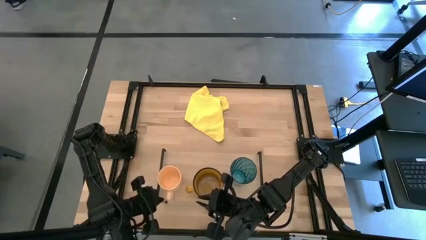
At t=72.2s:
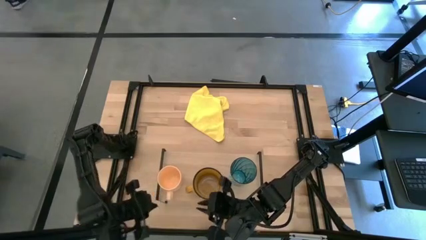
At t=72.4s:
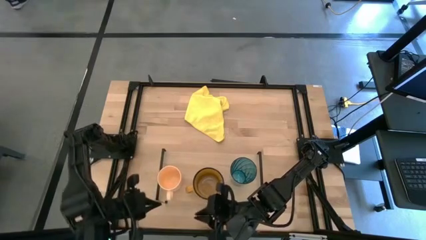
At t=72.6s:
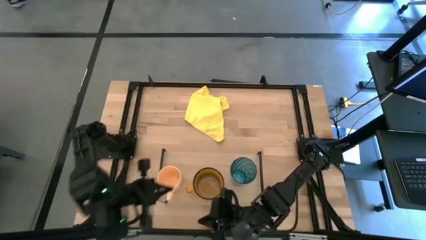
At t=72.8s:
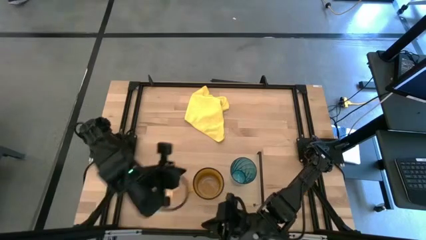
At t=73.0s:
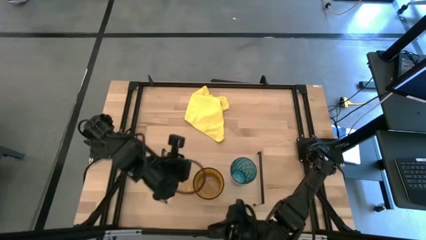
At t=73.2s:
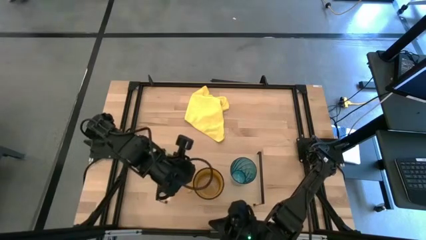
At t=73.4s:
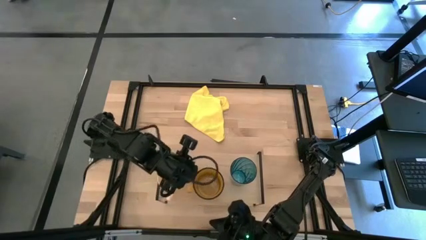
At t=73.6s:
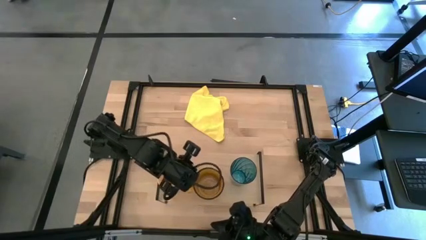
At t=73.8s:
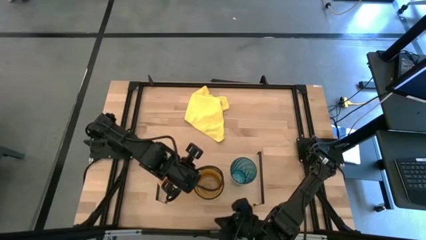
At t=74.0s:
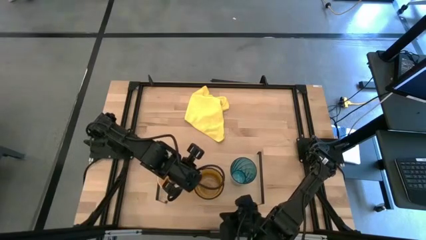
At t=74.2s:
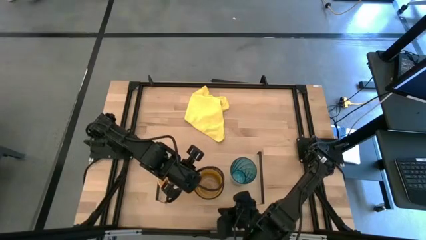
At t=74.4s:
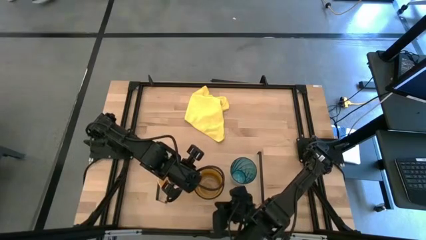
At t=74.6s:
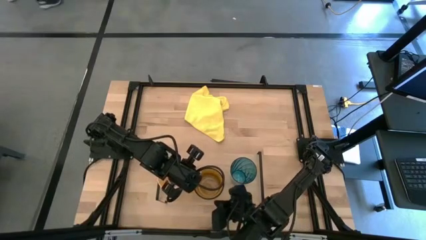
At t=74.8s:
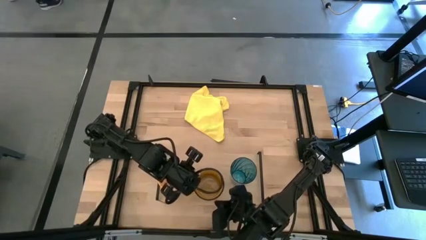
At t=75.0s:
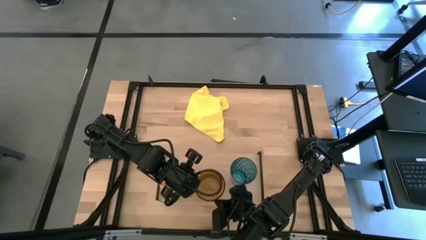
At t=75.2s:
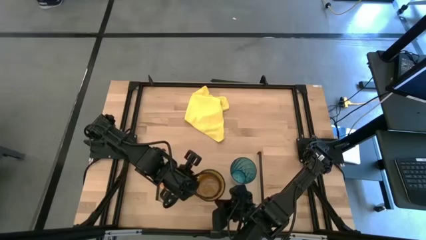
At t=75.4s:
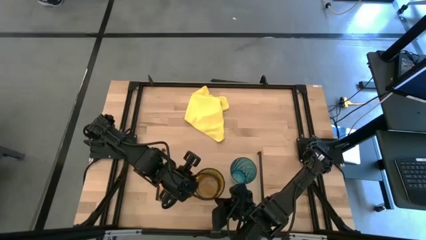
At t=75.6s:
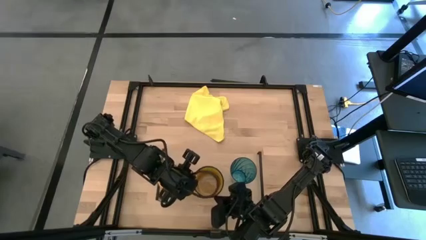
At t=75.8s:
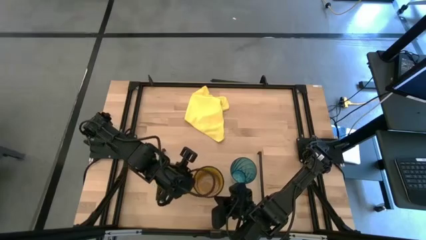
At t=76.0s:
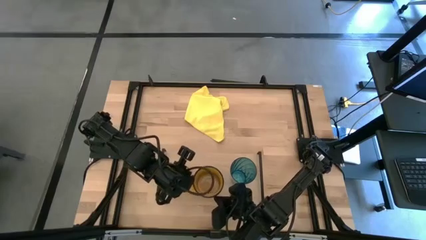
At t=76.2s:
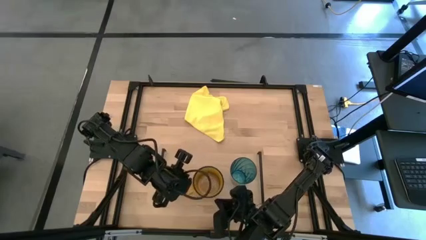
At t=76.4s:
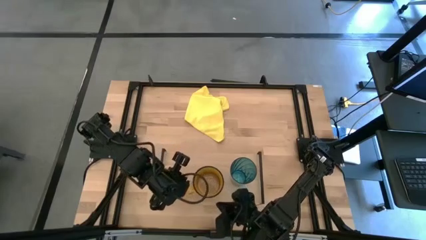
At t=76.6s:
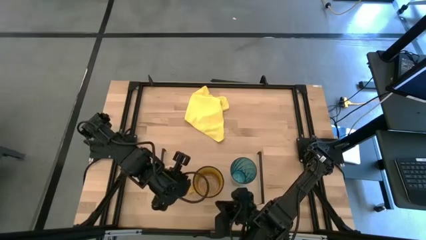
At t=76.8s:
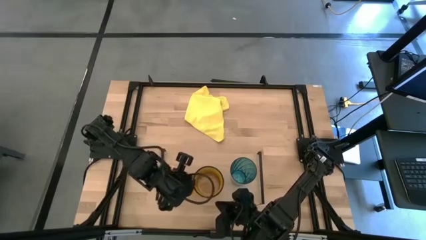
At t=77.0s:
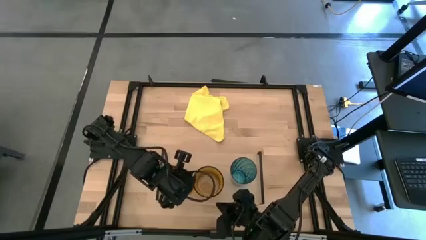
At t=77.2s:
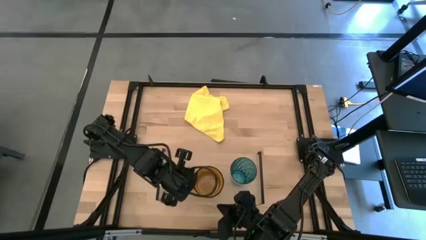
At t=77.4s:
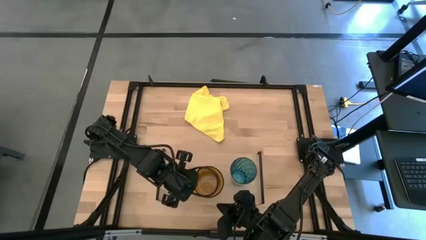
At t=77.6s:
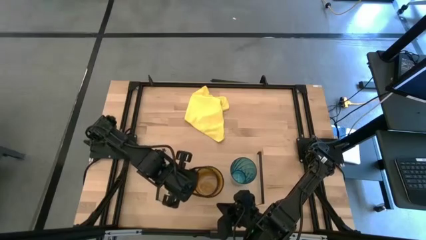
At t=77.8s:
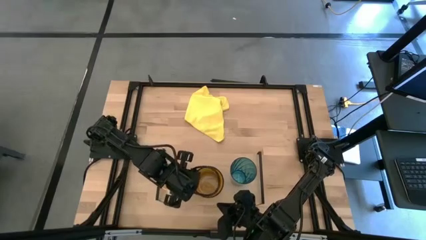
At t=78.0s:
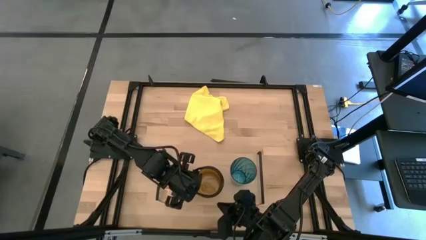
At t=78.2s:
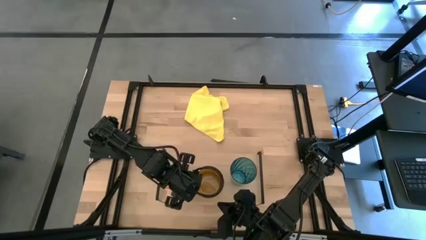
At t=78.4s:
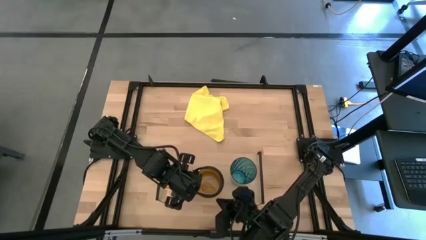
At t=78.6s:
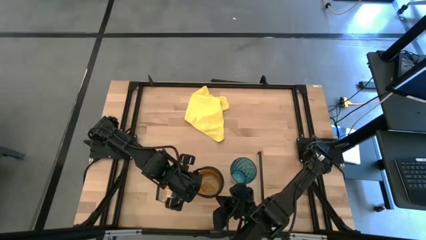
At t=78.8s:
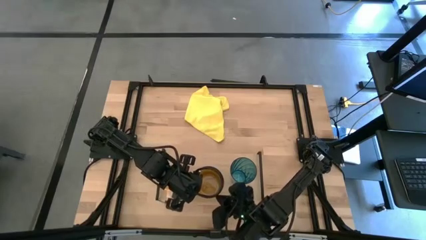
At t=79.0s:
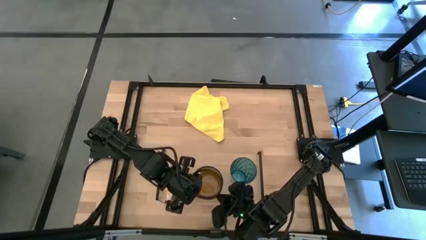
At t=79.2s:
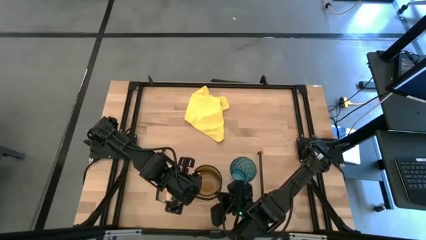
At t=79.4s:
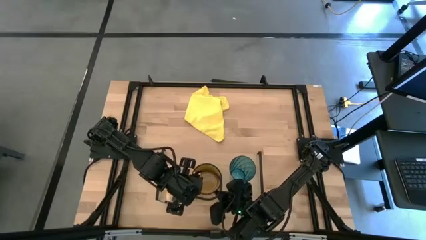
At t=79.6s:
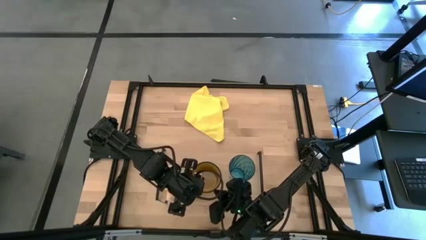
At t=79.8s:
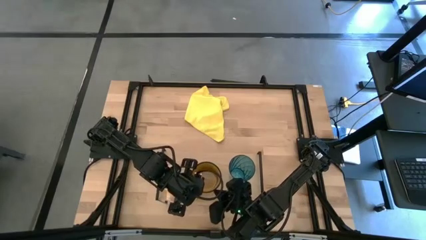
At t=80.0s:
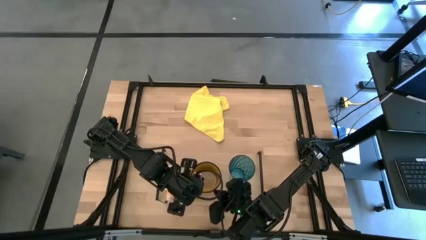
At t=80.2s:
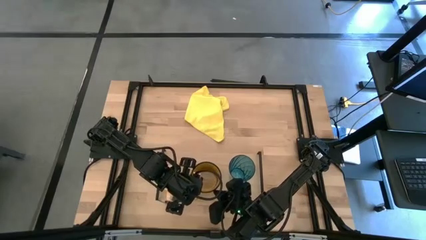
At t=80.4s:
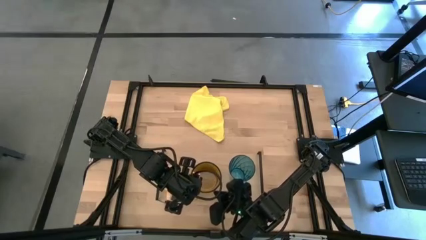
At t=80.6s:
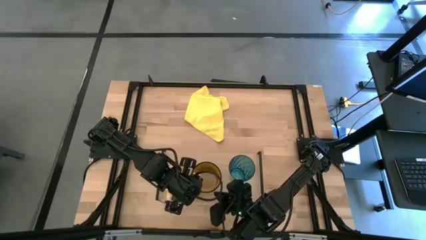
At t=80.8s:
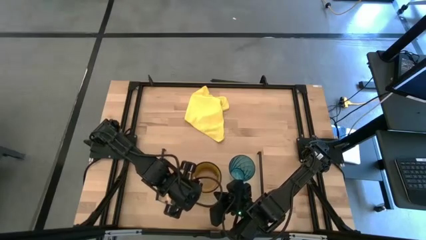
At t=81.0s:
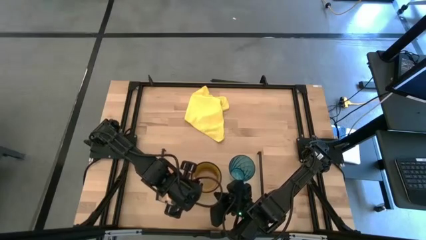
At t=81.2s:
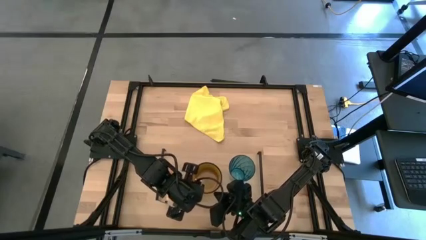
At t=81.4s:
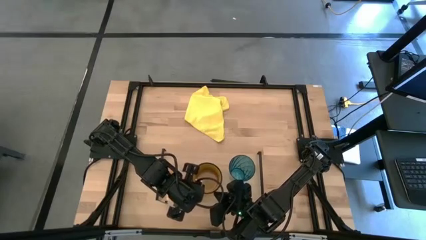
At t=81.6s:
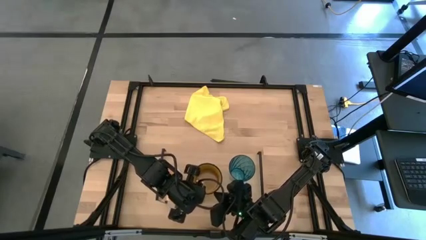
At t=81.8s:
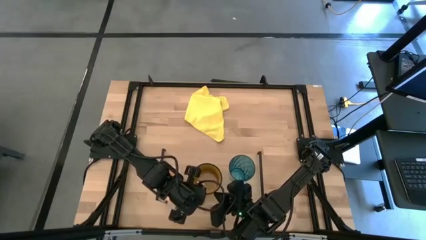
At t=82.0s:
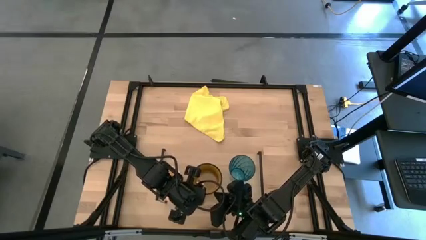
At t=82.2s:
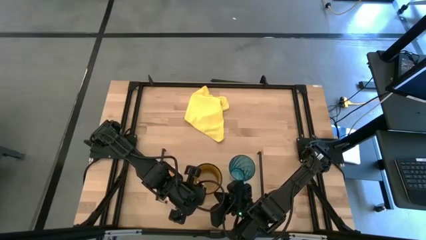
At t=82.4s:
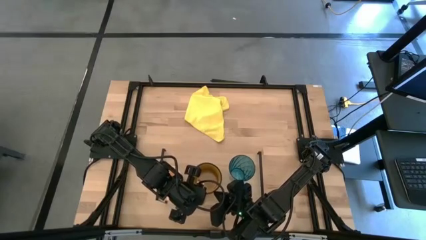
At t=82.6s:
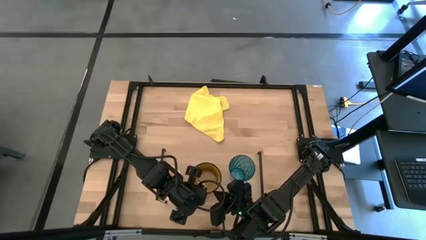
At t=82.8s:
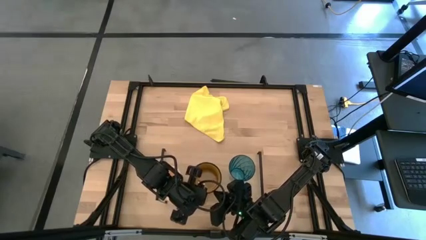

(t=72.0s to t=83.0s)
Task: Stack small to large cups/mugs on shelf
Adjust the brown mug on the shelf

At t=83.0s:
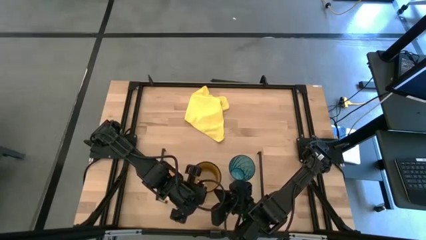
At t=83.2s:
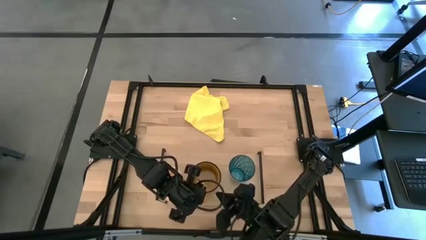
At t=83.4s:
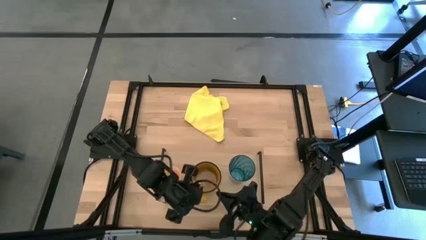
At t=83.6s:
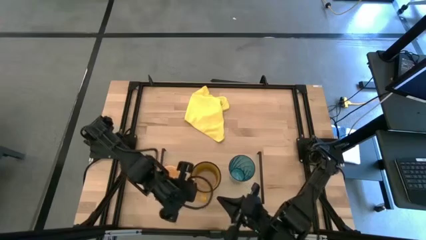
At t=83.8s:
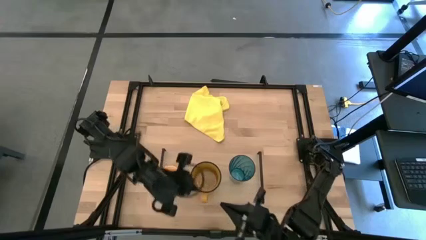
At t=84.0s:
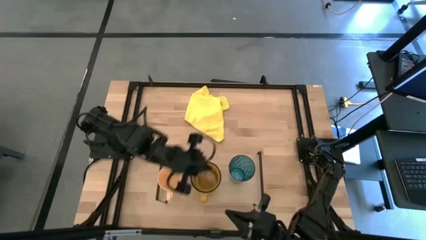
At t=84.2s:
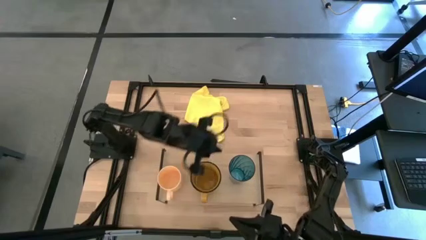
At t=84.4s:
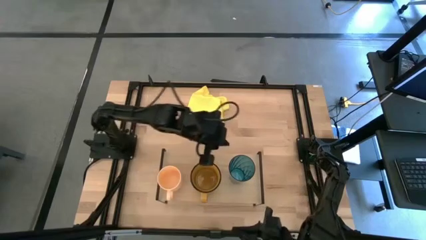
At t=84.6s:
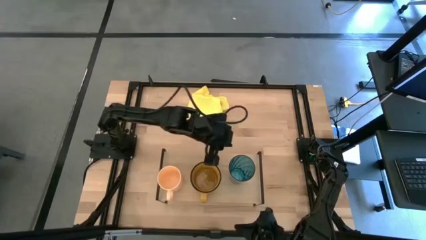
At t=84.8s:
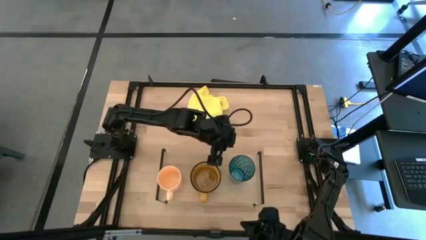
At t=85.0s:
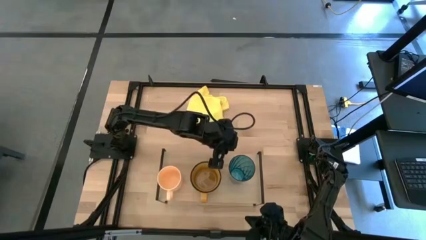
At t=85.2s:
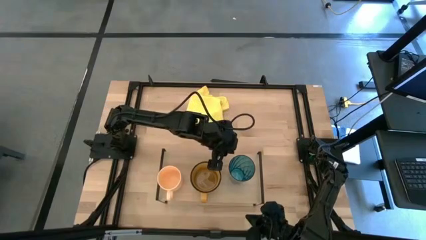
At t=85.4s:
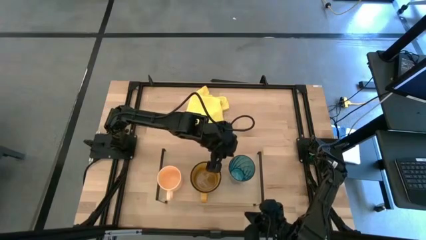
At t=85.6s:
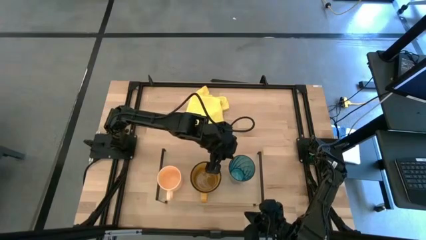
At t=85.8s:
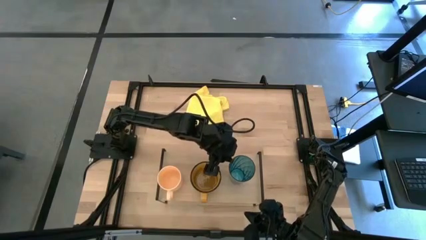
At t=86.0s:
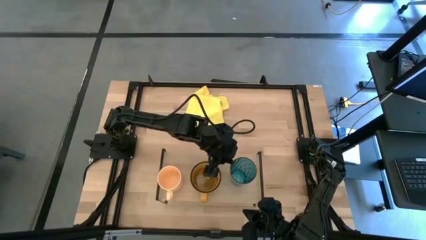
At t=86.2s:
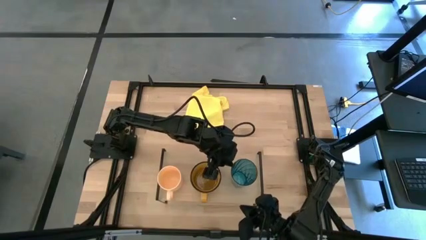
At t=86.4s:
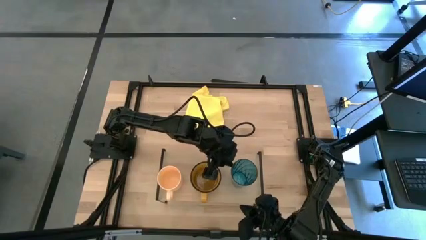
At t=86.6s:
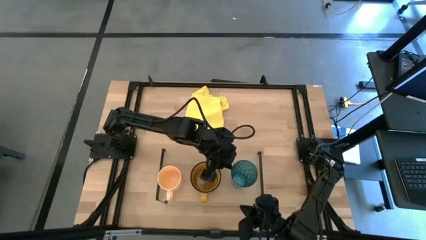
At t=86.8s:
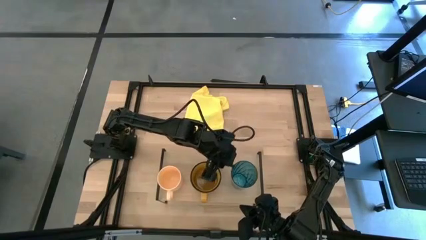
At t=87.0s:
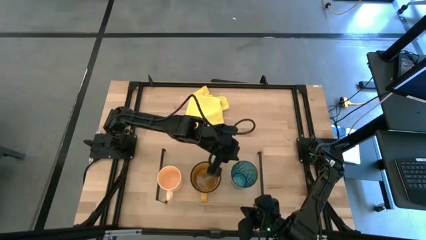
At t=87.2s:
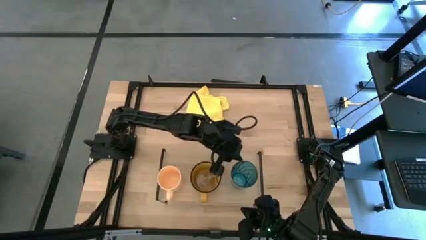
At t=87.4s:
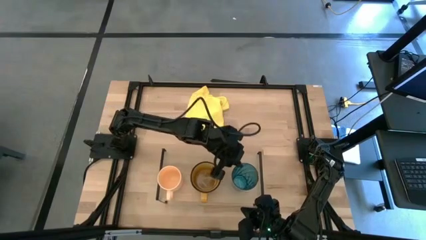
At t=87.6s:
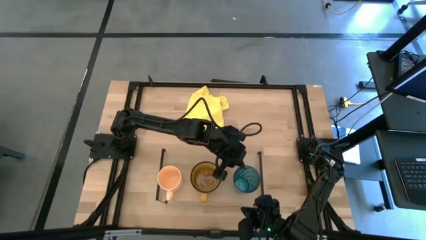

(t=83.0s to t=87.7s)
Adjust the blue glass on the shelf

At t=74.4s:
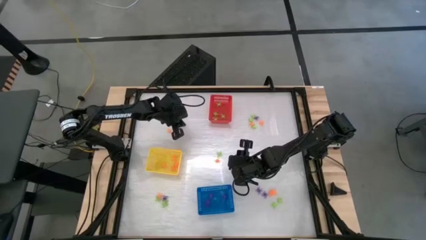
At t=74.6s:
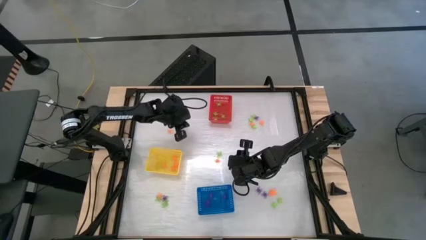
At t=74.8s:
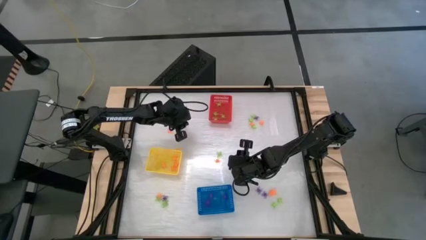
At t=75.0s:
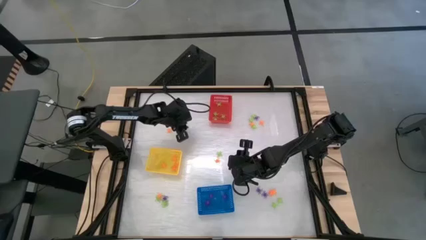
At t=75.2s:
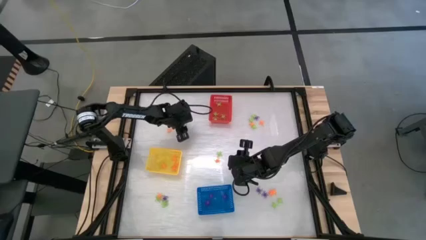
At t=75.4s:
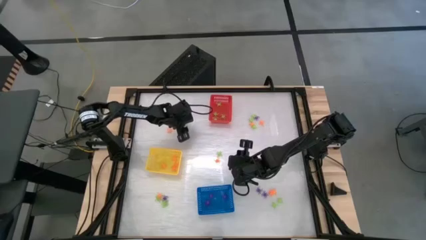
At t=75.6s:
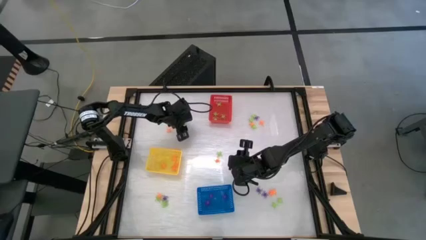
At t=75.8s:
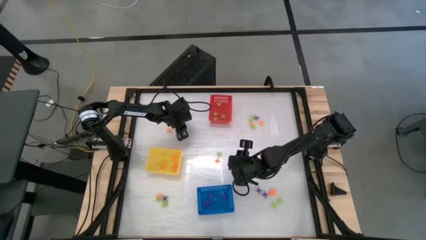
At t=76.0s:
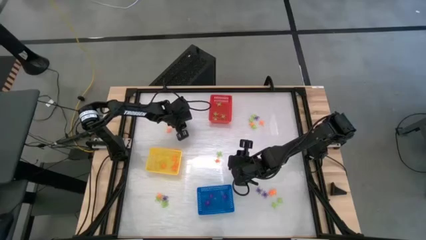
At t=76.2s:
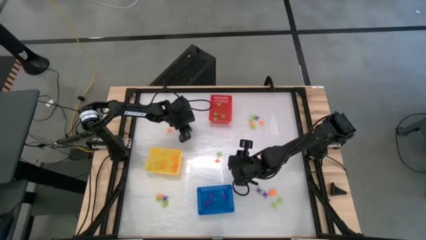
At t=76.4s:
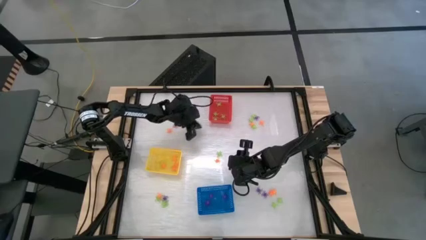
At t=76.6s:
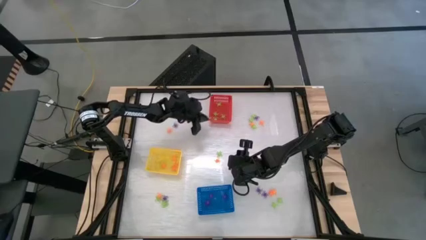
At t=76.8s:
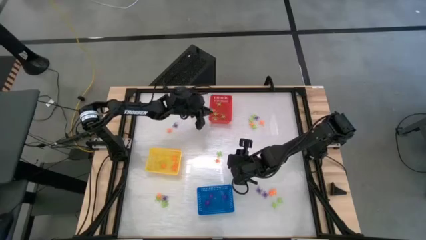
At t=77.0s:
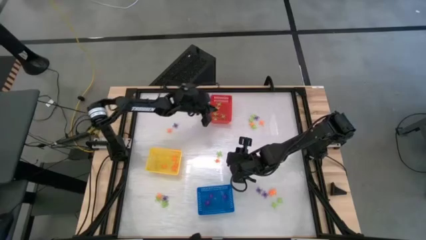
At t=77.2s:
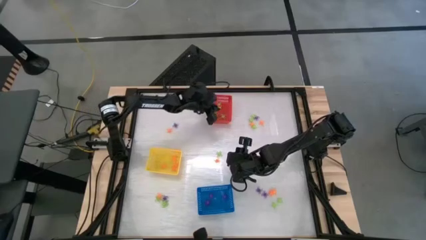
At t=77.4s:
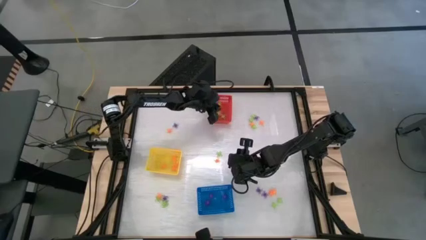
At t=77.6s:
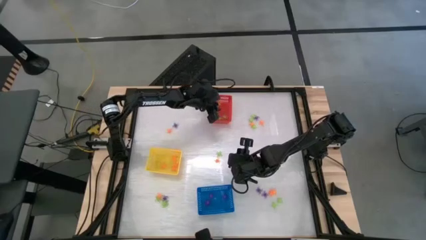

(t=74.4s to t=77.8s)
Task: Sort Halloween decoration
Put the green spider toy into the red basket
